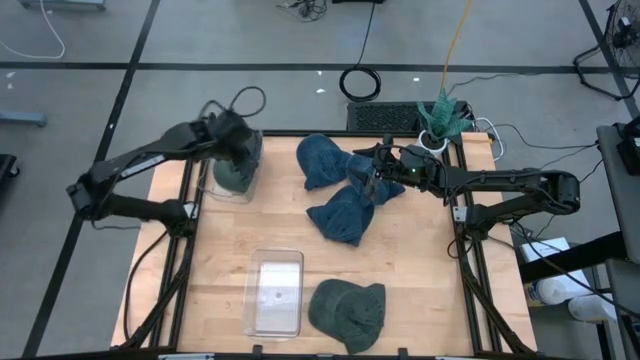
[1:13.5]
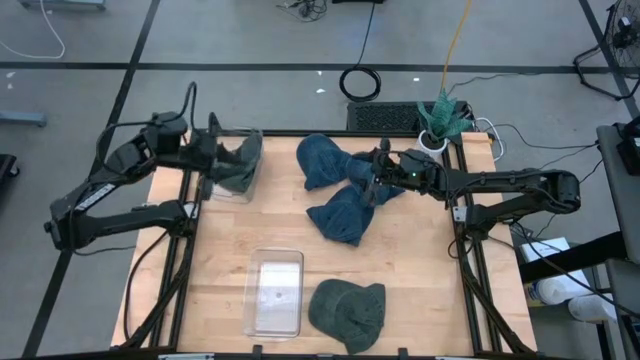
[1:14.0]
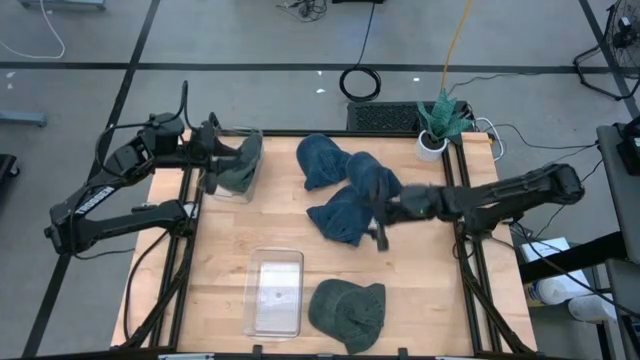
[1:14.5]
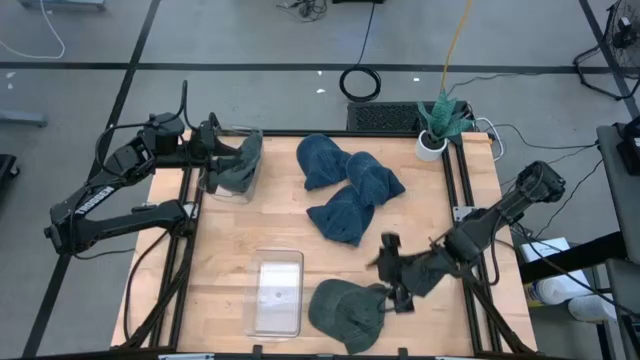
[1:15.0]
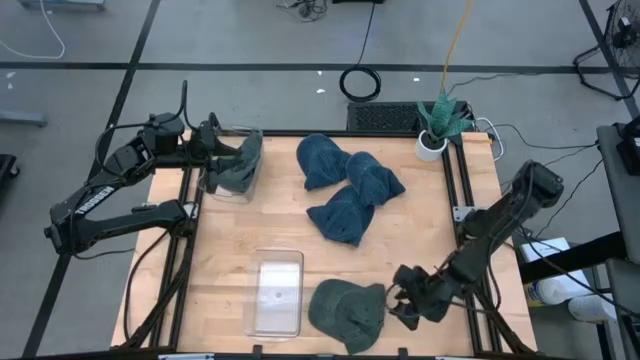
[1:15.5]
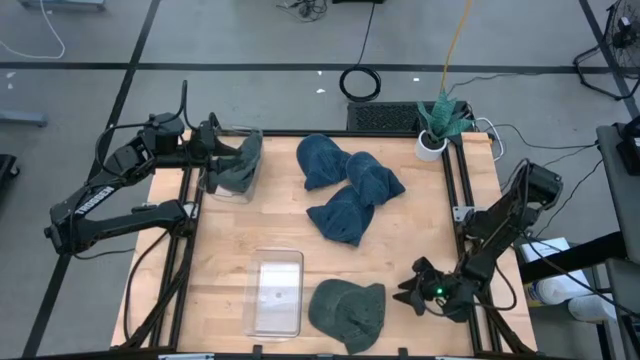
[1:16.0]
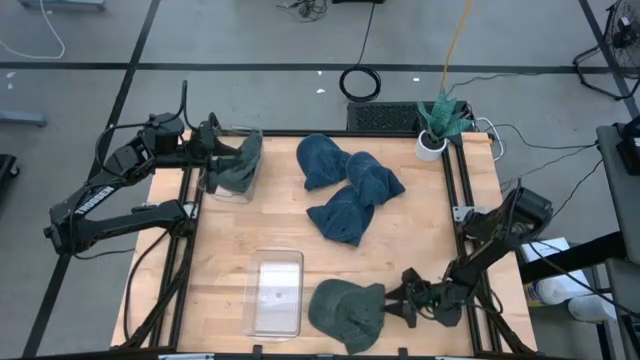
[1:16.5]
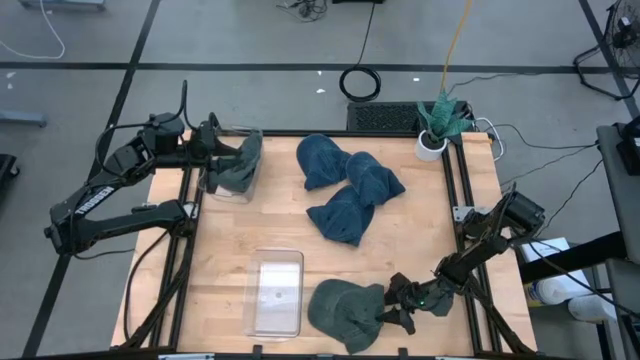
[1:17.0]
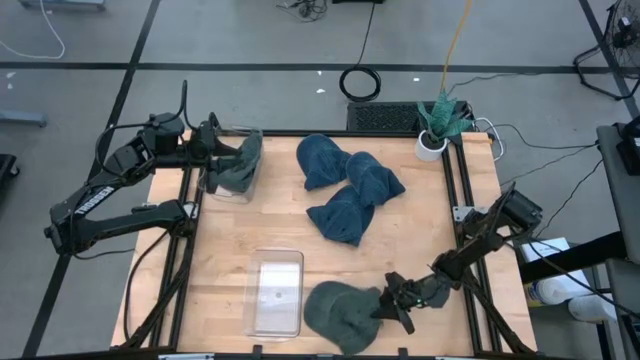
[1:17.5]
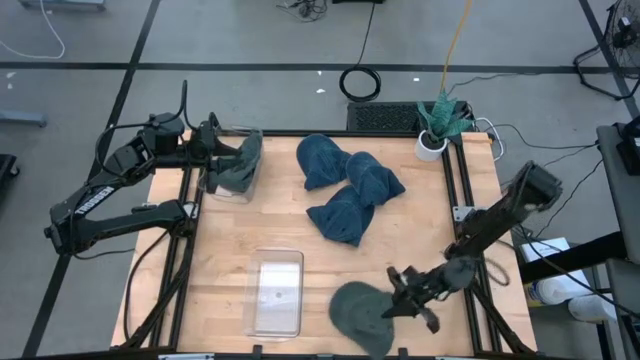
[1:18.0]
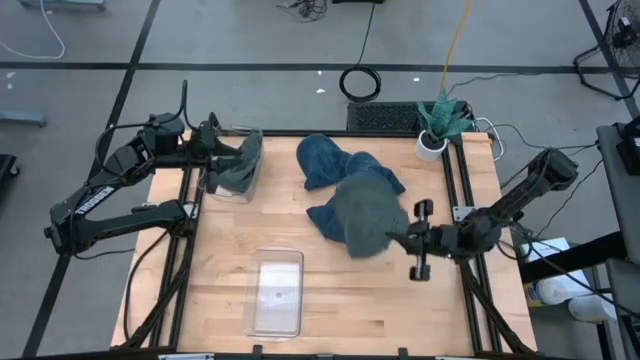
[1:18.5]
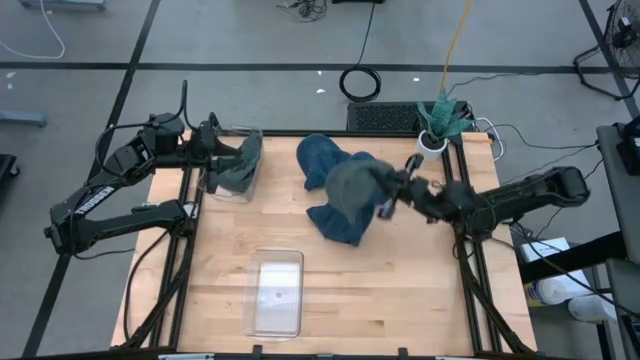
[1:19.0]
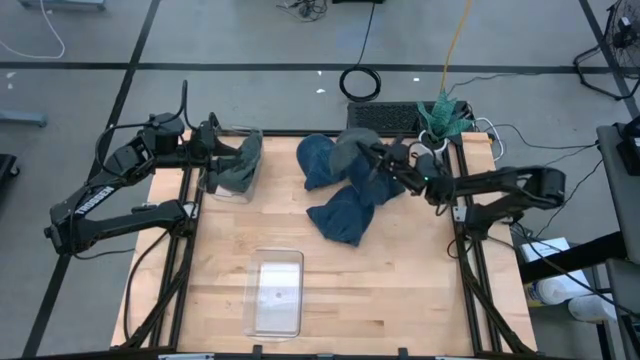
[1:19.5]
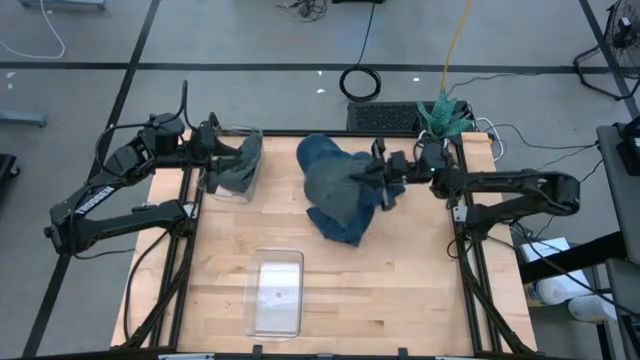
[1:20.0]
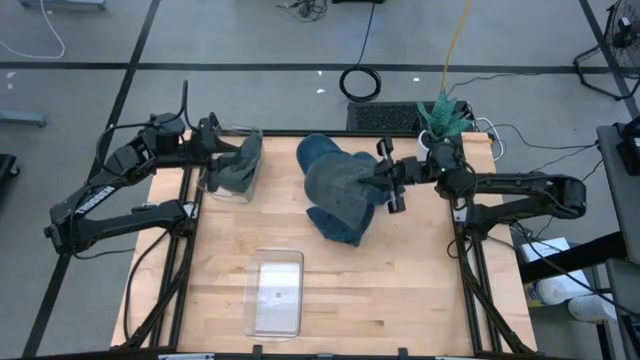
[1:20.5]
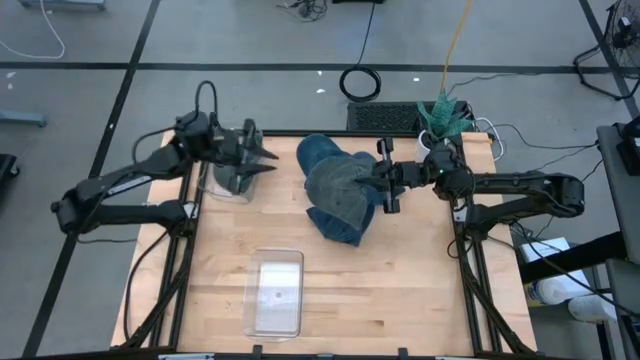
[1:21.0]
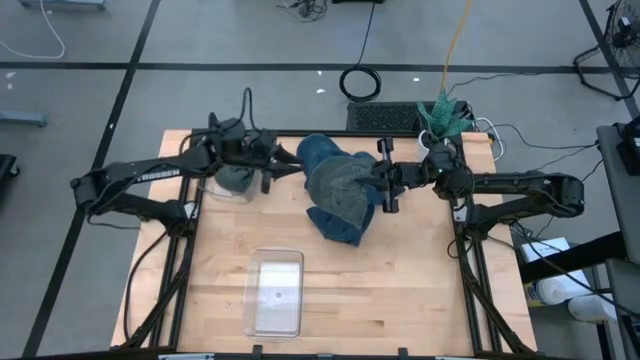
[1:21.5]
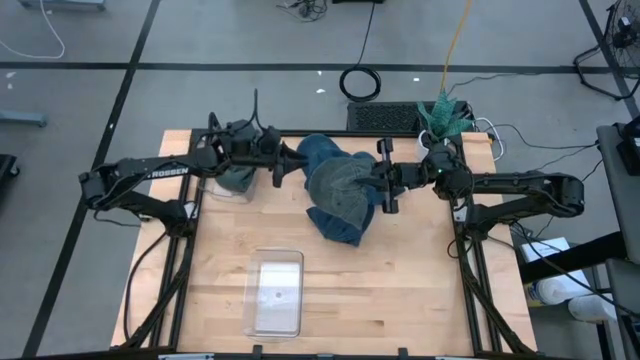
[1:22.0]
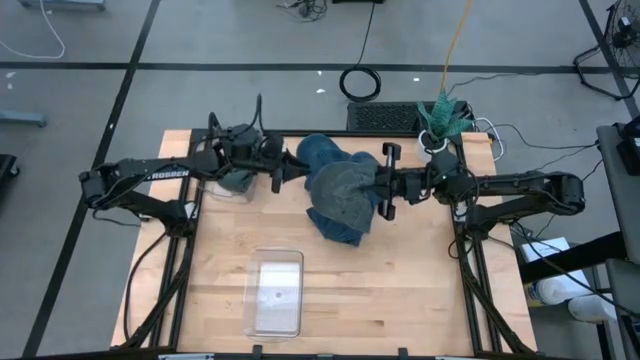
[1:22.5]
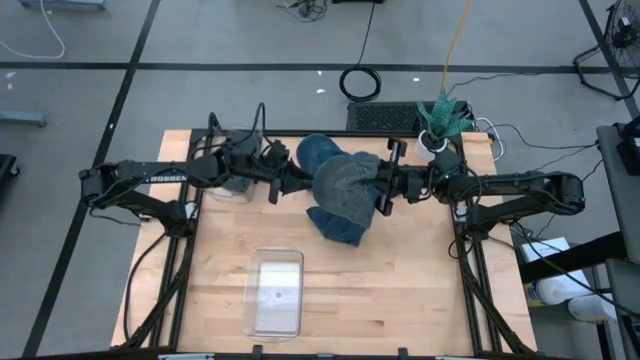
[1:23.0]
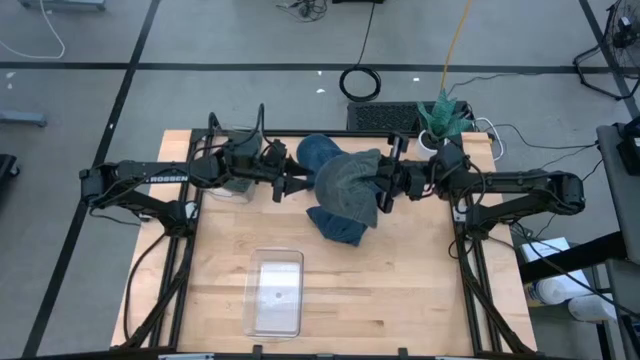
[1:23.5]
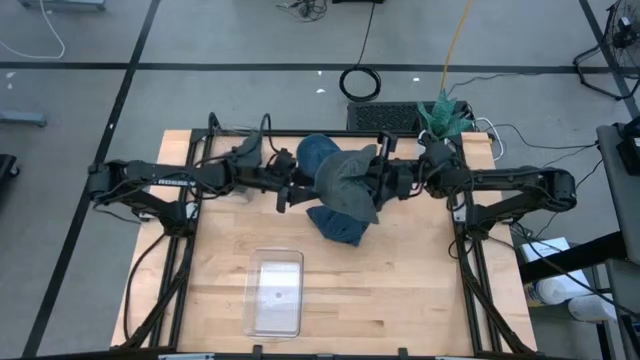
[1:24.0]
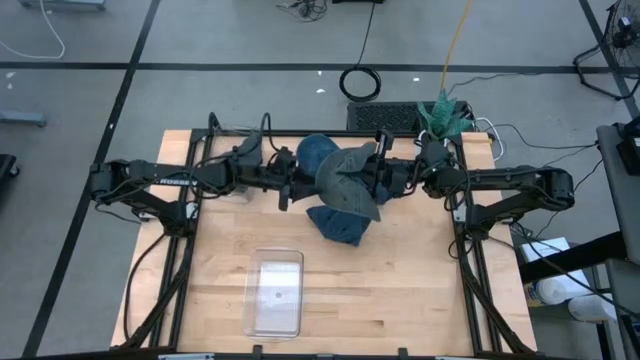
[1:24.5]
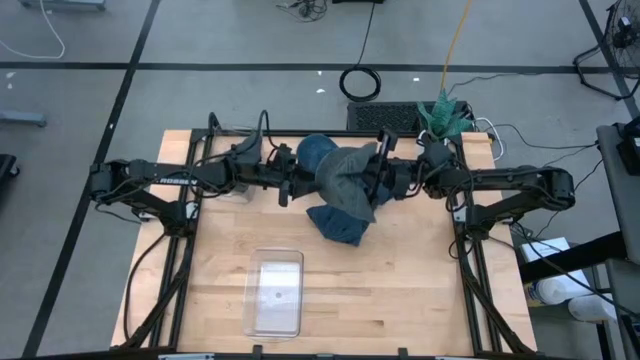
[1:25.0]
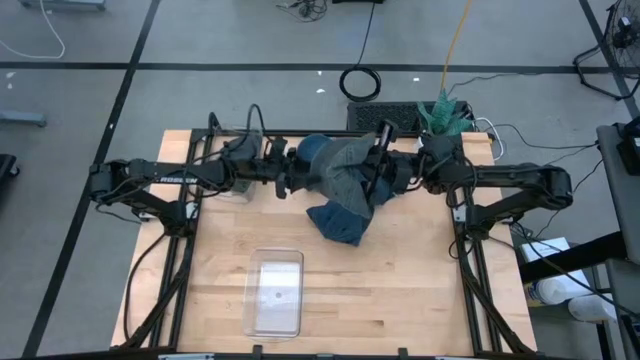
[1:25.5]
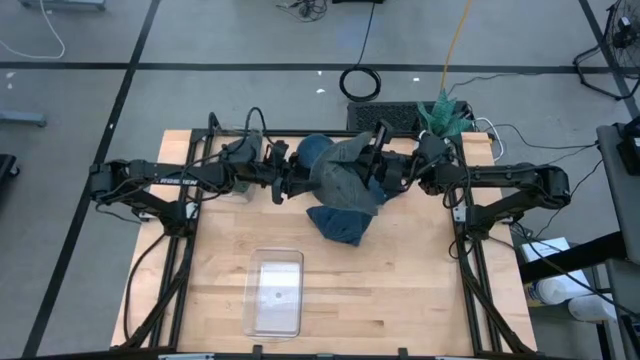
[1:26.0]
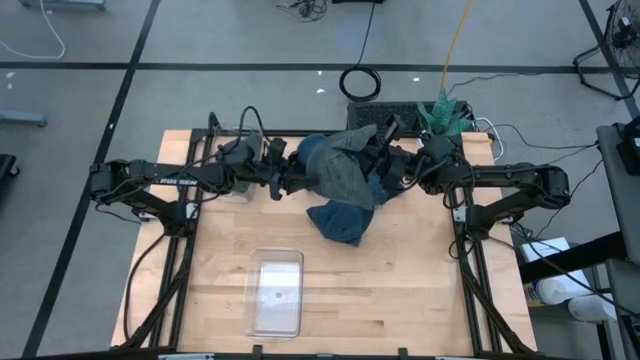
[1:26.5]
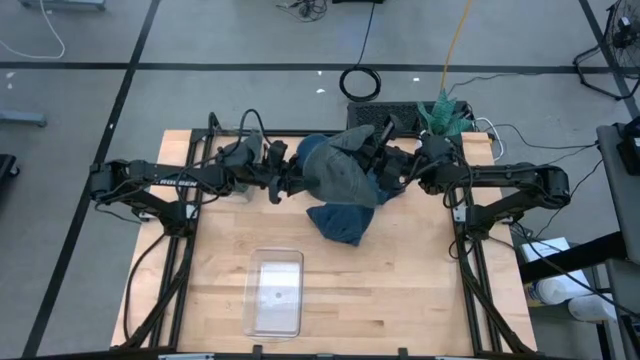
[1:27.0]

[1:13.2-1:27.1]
Task: Pick & Place hat
Put the green cap into the top transparent bin

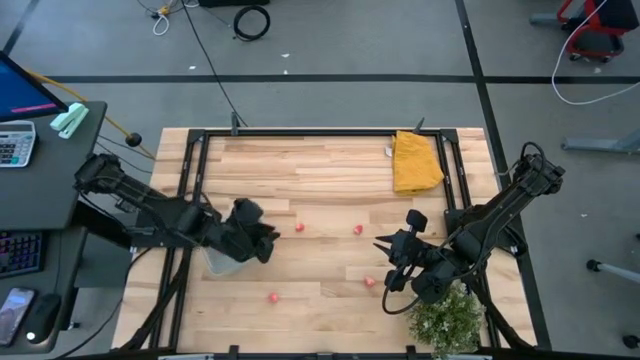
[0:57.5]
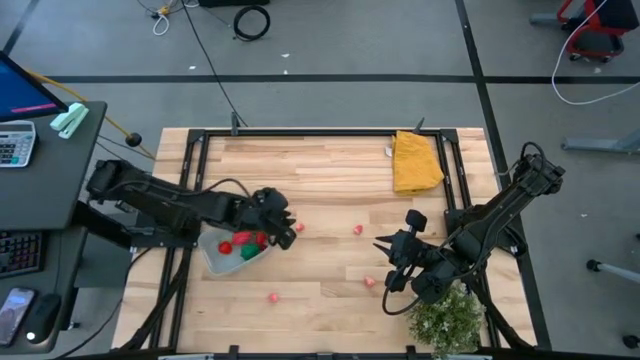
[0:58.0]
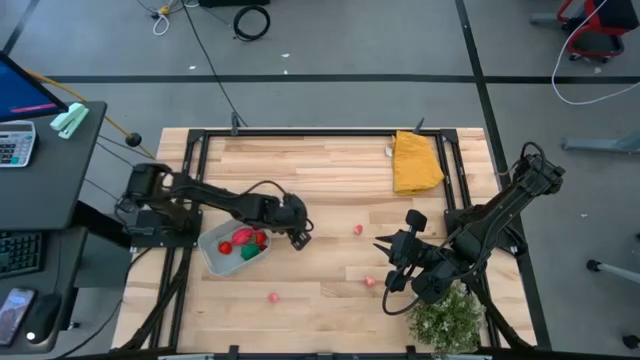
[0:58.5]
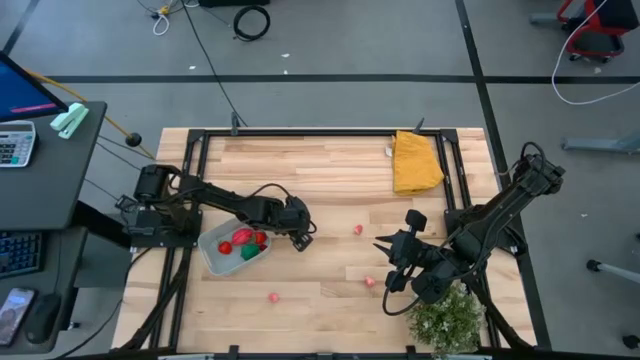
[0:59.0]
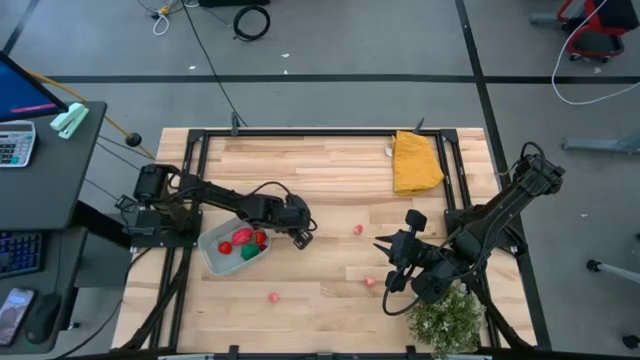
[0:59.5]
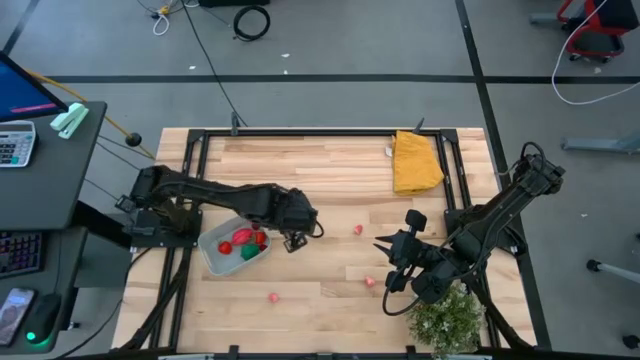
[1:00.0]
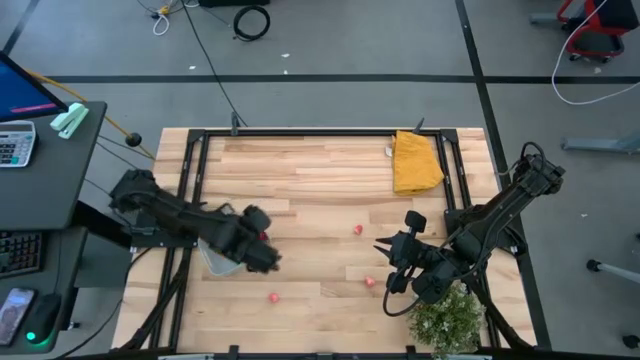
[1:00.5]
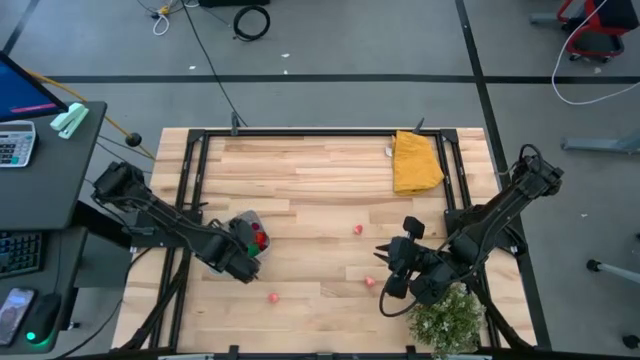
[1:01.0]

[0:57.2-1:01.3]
Task: Pick and placing Produce into tupperware
Put the pink apricot into the gray bin

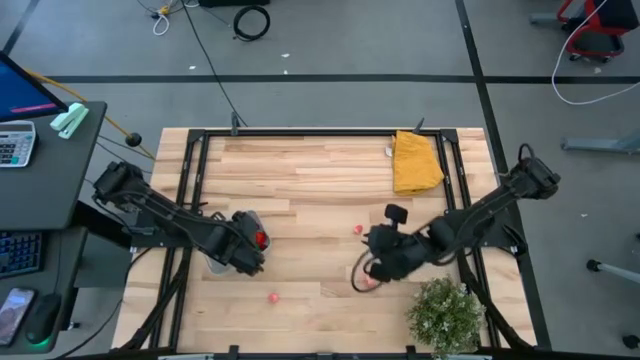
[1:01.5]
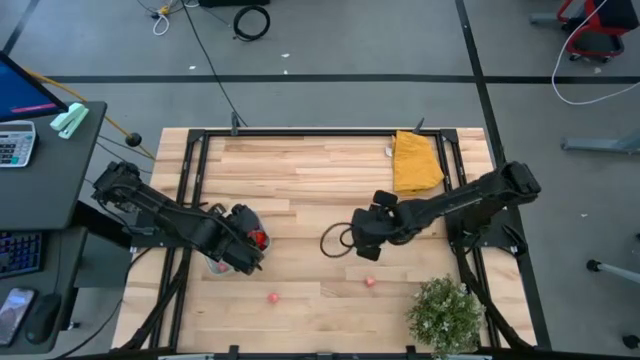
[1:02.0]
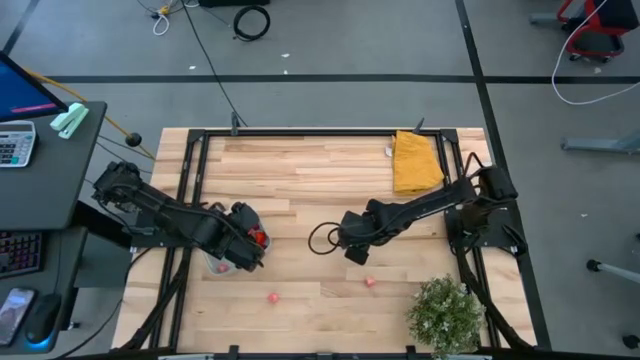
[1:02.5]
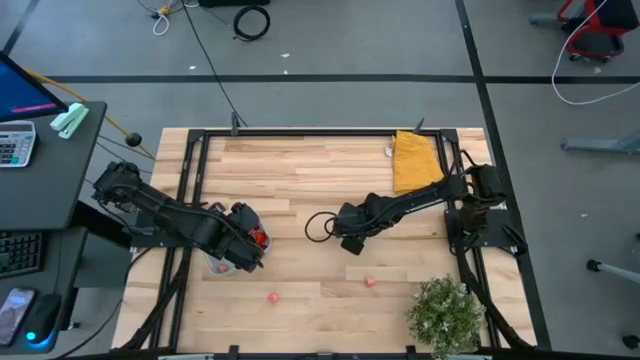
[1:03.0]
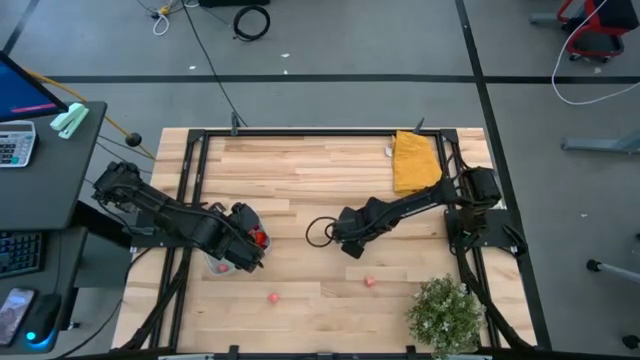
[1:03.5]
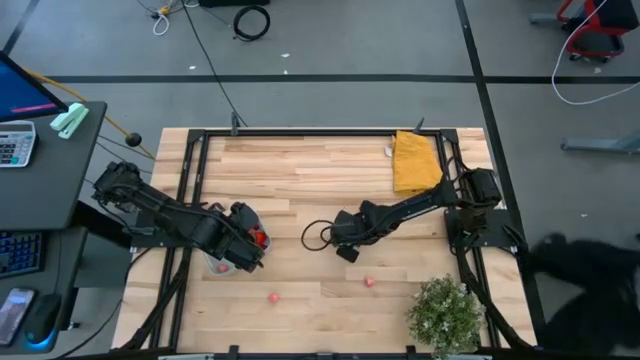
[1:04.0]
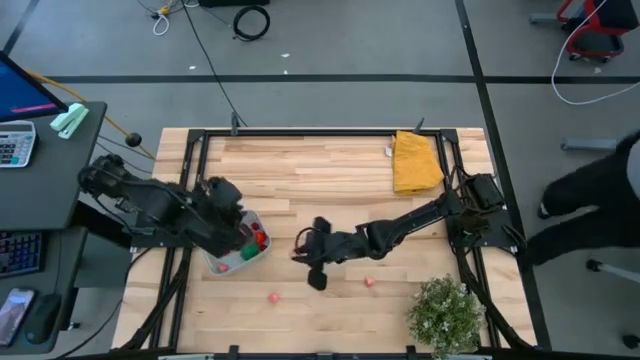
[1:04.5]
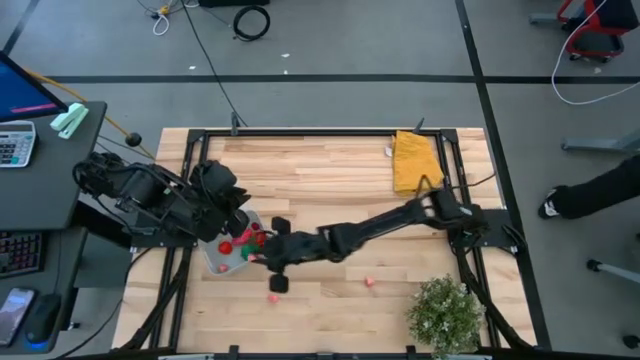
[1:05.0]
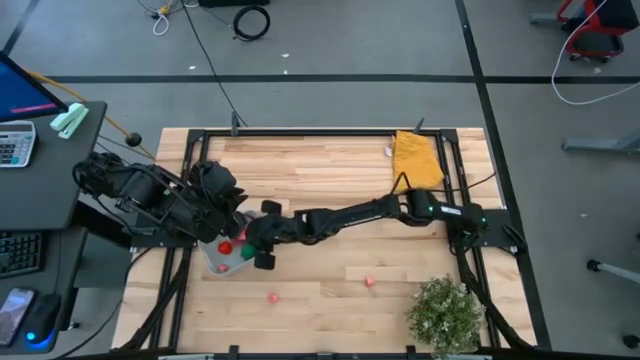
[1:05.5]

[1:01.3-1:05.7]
Put the top right pink apricot into the gray bin
